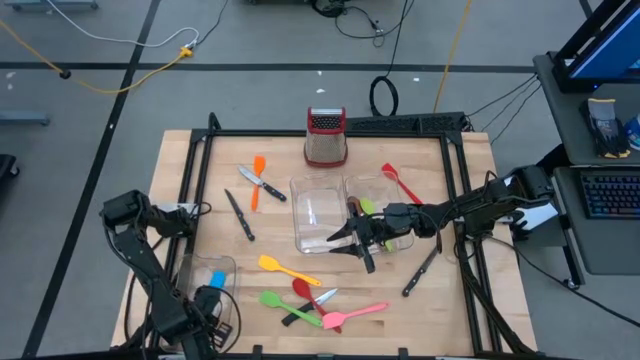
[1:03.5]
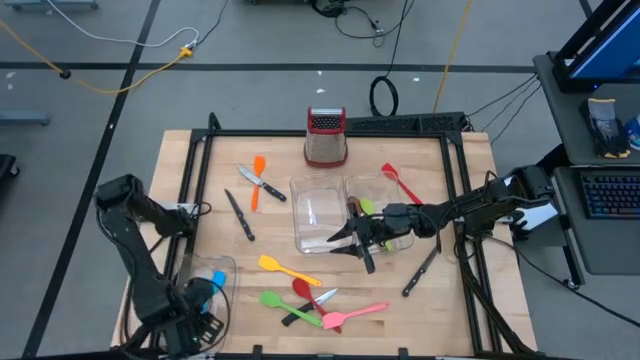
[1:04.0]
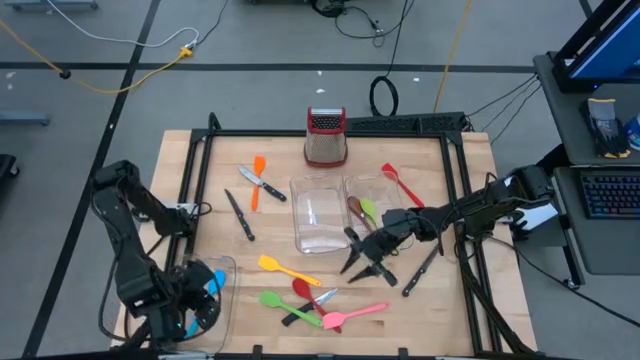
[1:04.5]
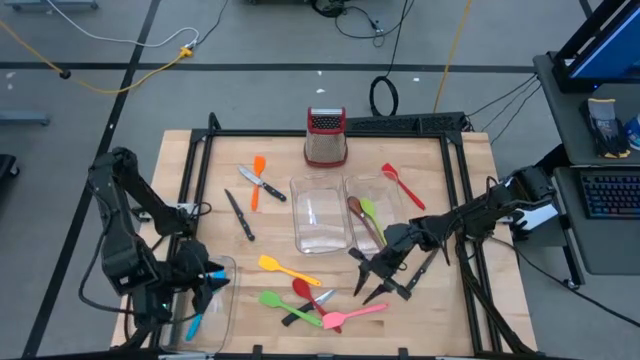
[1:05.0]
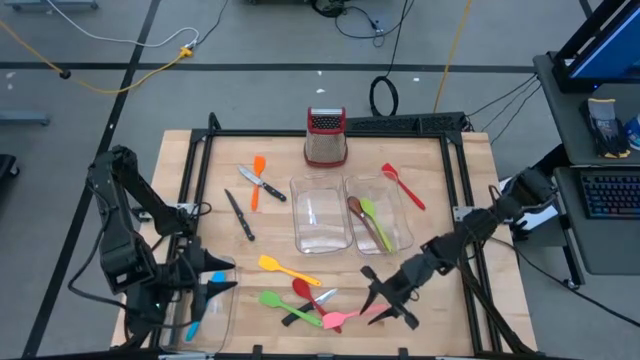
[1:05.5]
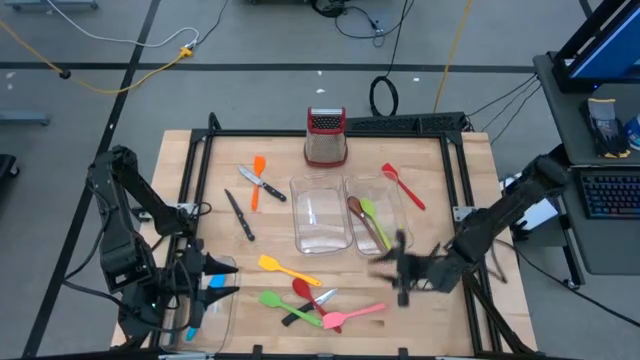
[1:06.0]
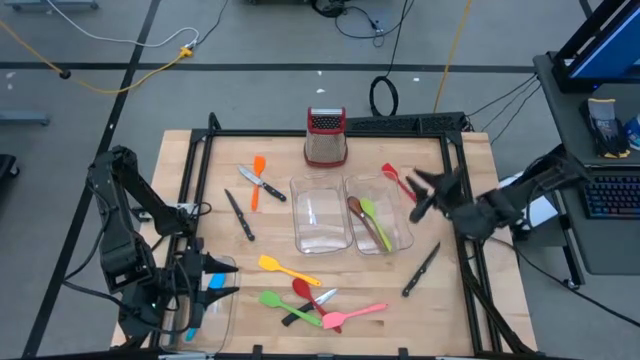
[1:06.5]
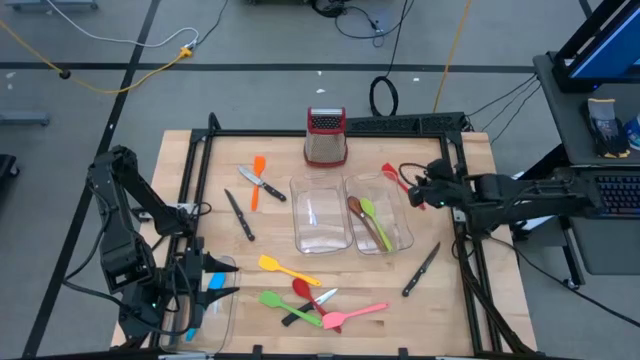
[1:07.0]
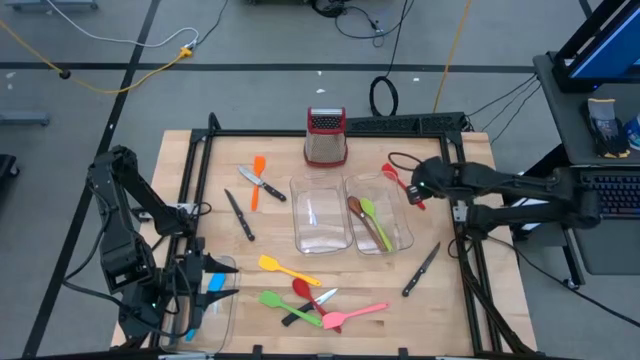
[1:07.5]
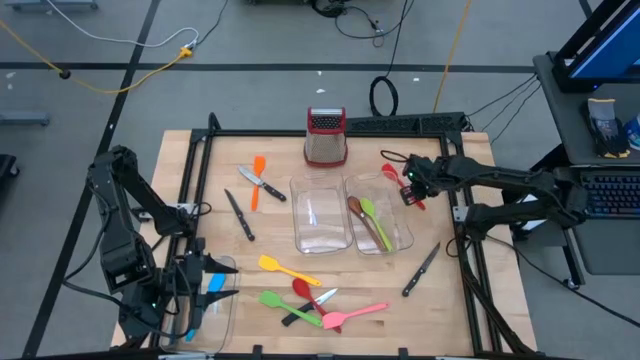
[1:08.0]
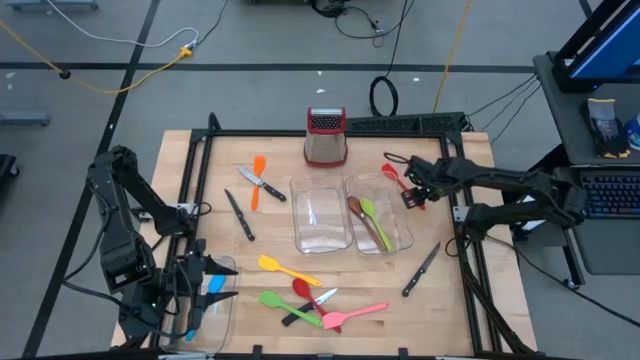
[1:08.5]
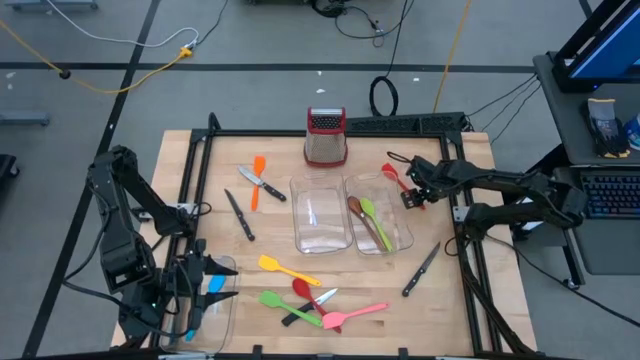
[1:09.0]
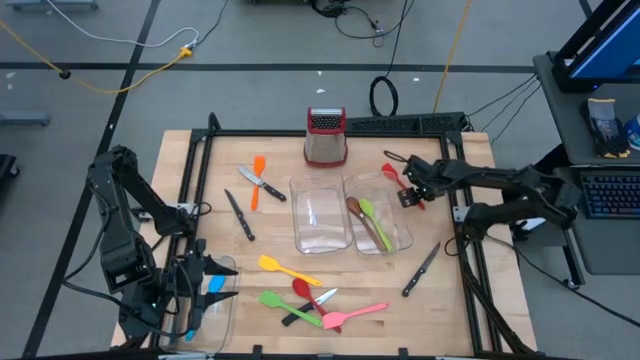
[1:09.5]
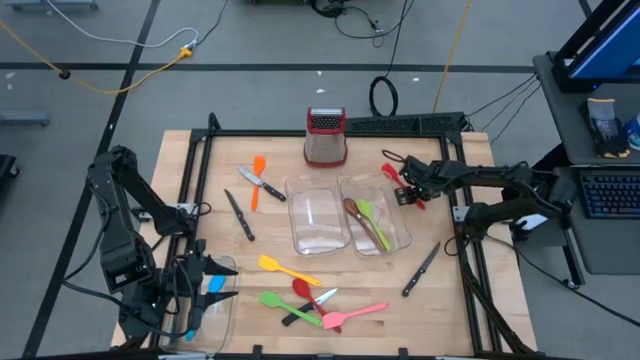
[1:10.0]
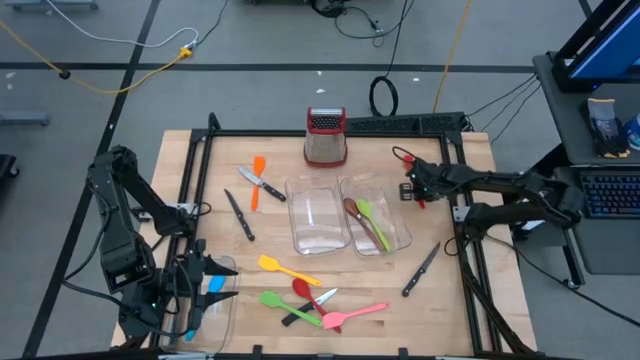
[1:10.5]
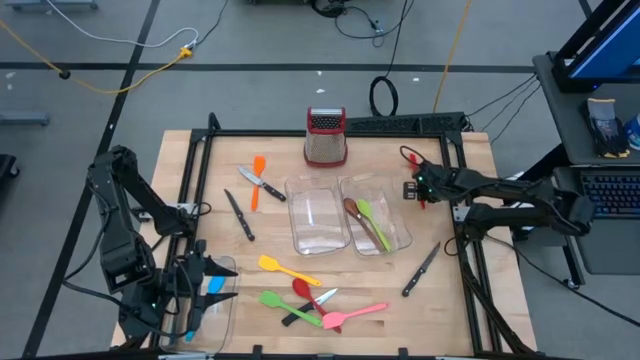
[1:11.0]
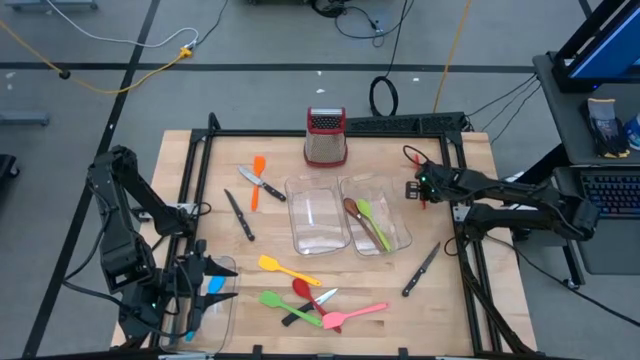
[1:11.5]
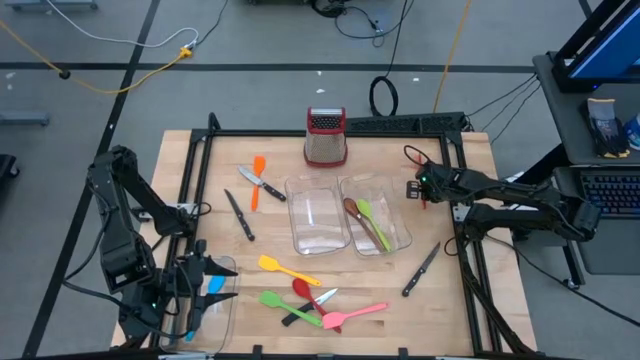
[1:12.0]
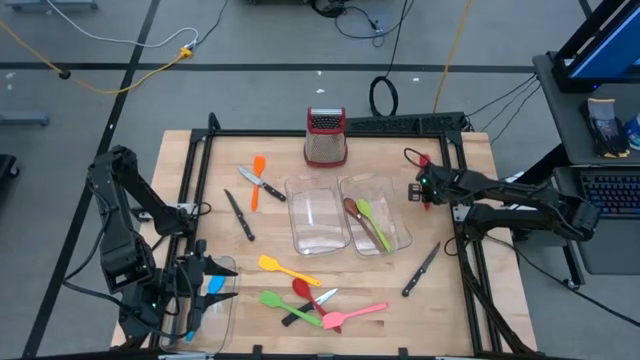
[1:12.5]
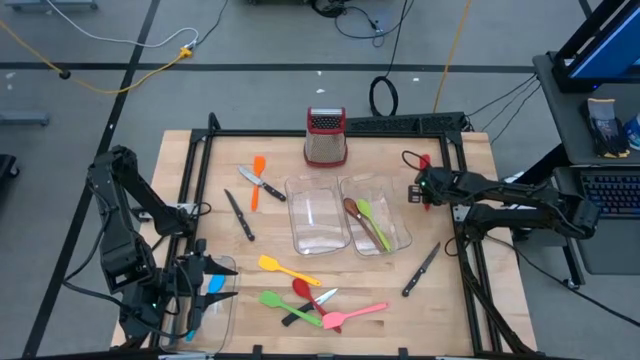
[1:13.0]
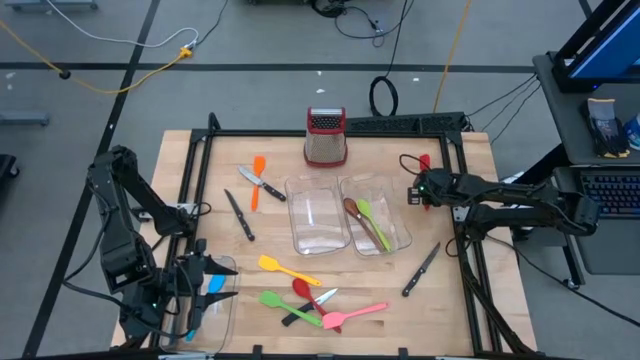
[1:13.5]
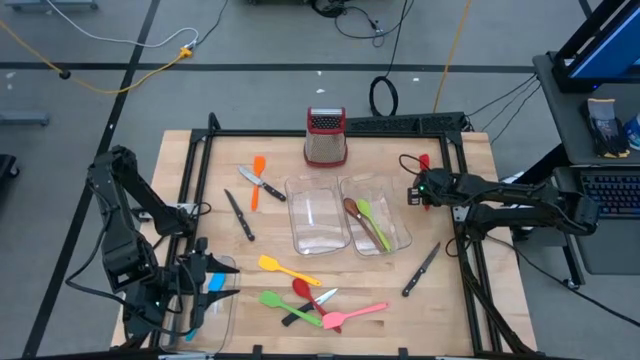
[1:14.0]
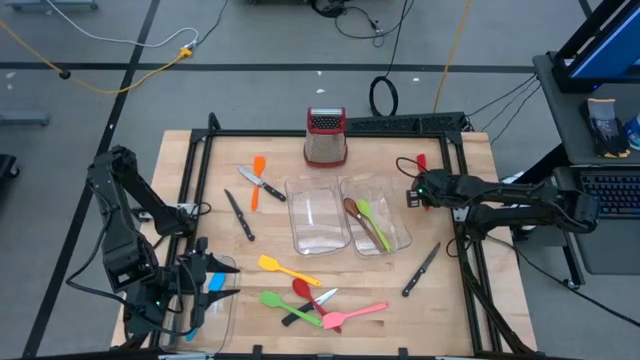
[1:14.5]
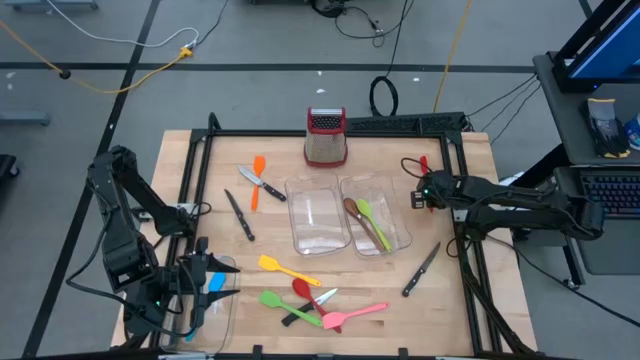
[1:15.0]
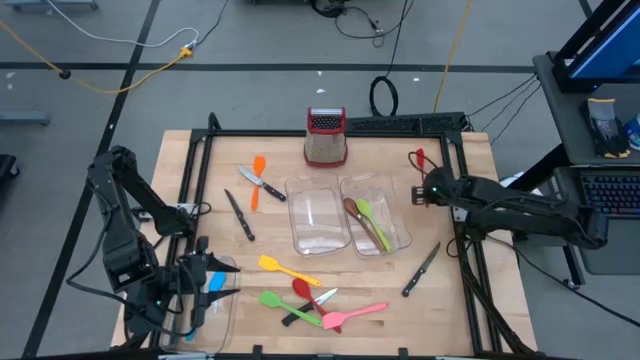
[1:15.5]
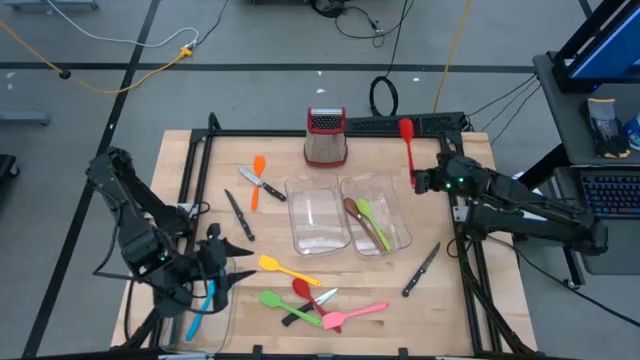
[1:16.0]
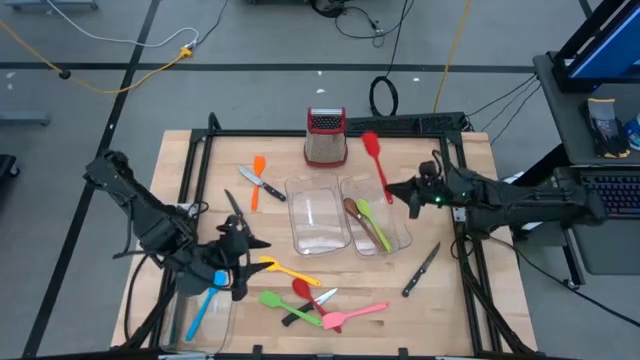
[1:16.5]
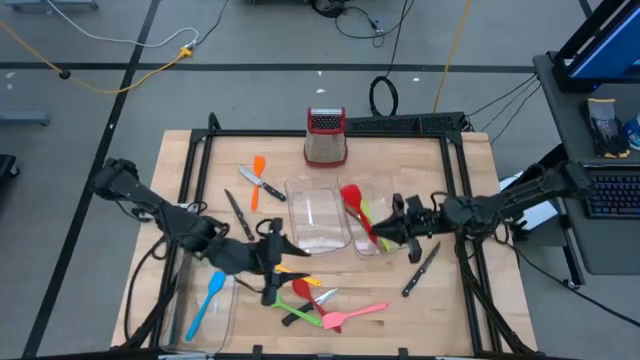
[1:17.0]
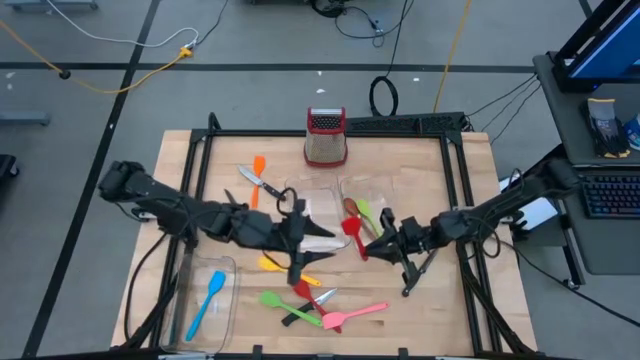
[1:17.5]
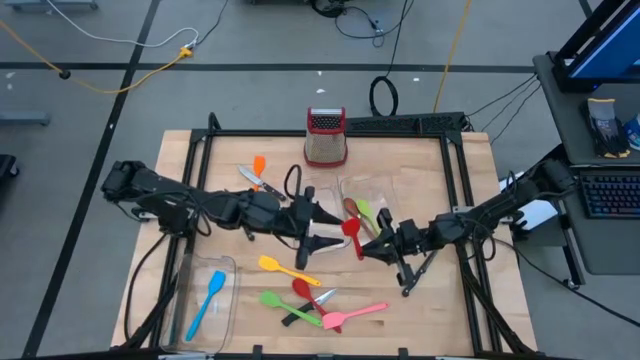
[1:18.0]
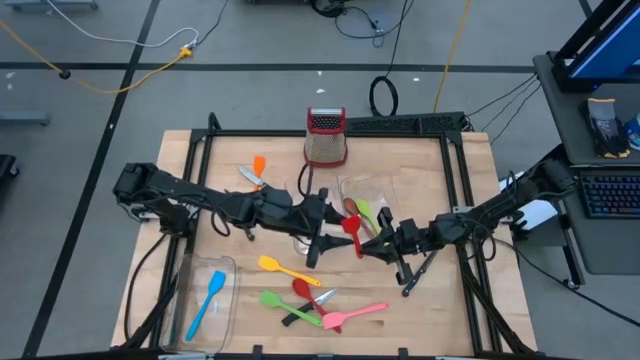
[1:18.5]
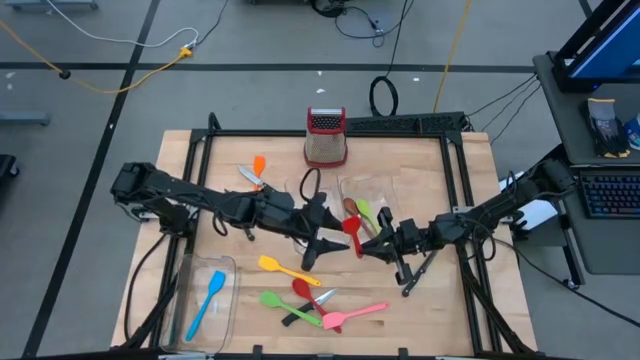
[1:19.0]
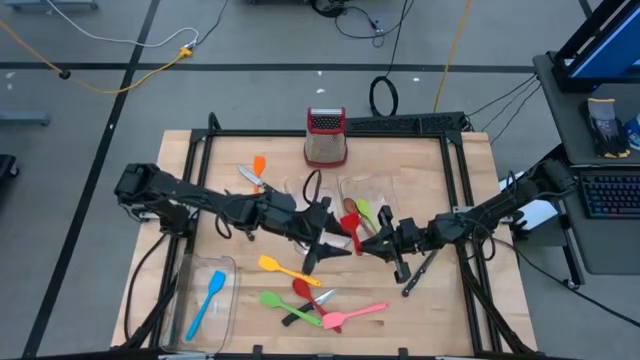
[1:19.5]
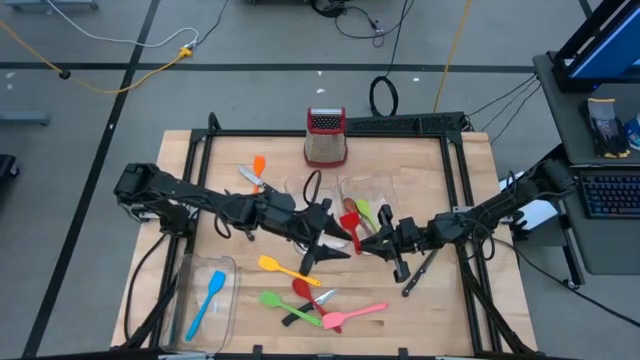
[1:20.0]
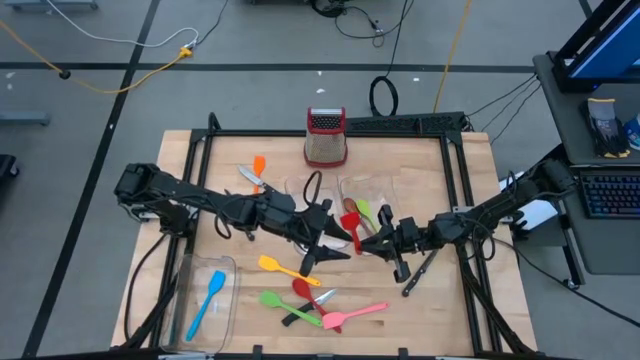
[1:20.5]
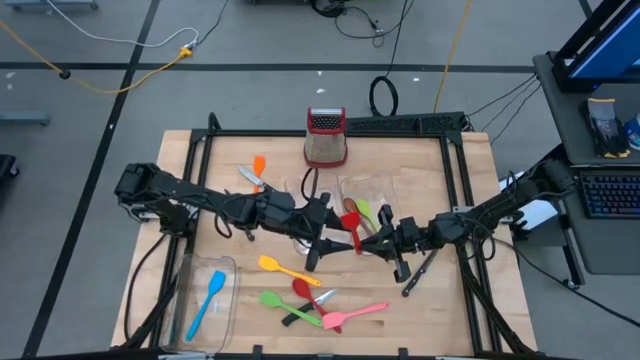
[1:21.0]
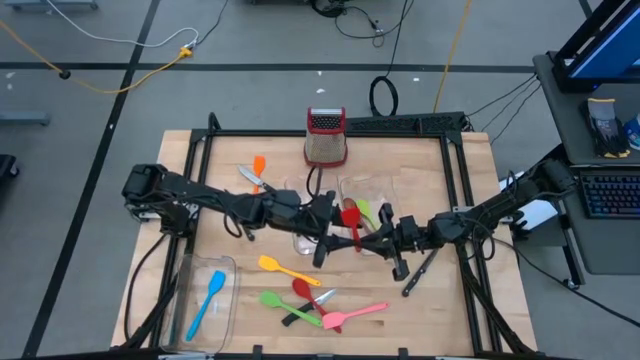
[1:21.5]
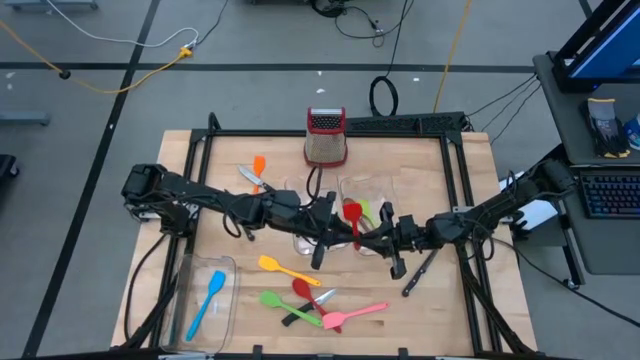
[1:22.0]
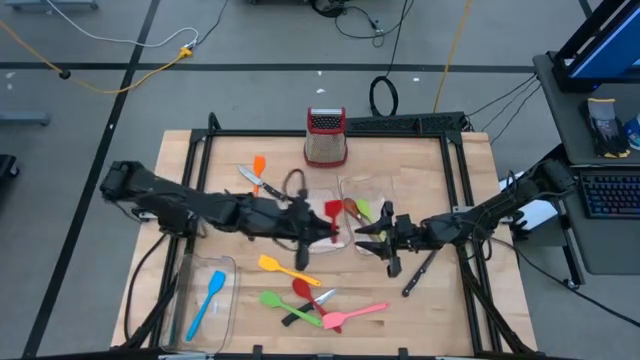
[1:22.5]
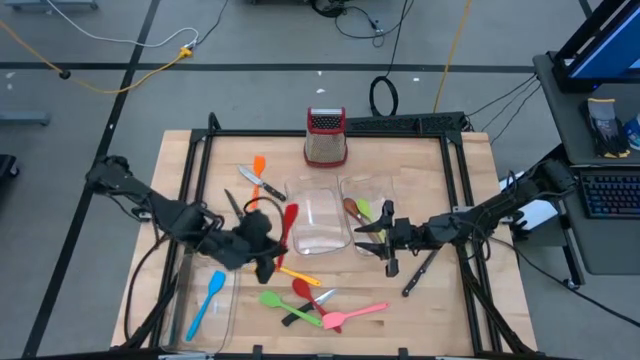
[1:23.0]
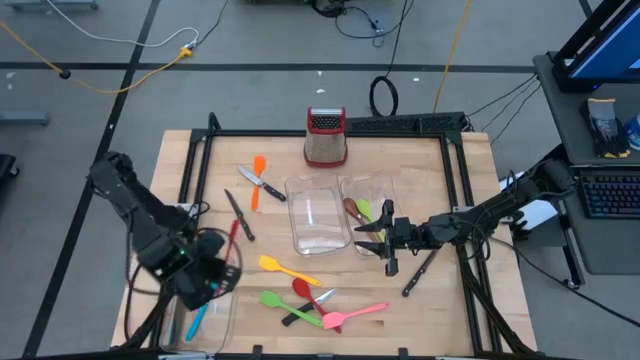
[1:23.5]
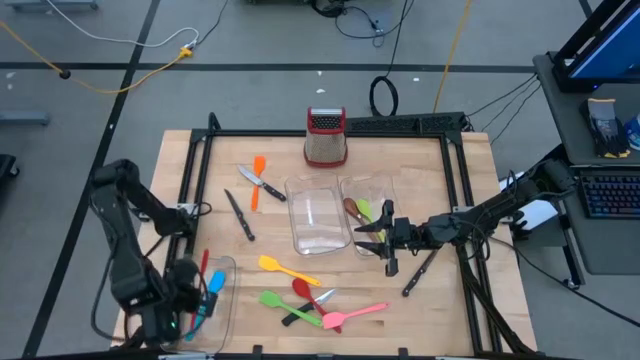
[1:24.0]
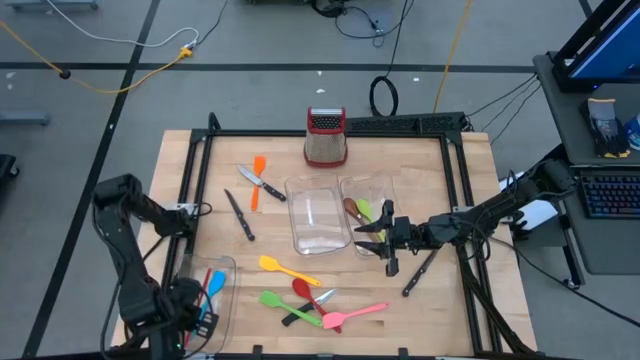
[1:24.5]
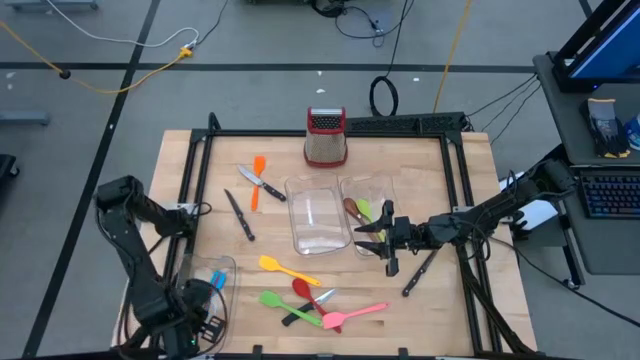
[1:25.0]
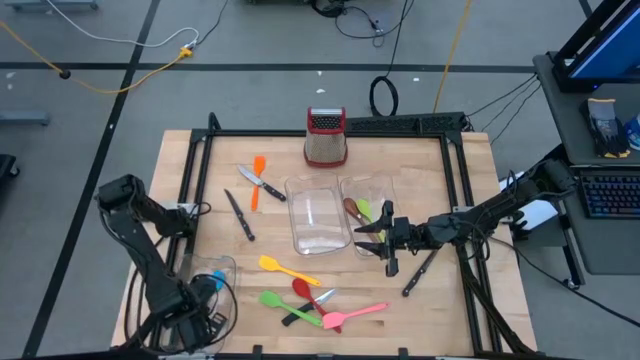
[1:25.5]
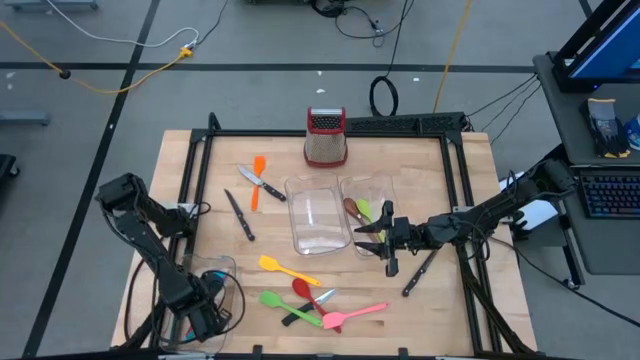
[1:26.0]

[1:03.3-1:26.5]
Task: Pick & Place Kitchen Items
Put the red spatula into the left transparent bin
